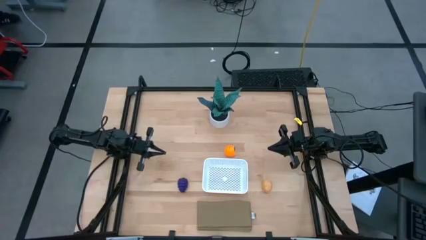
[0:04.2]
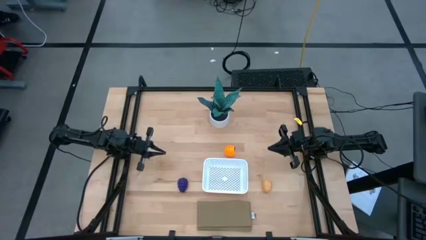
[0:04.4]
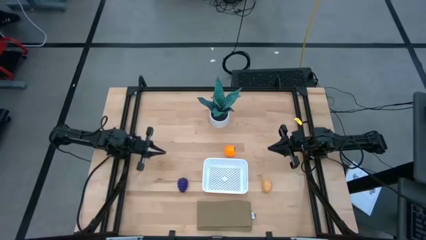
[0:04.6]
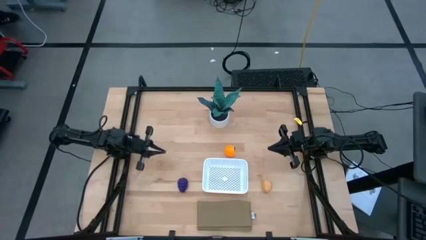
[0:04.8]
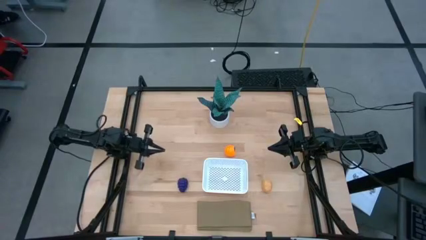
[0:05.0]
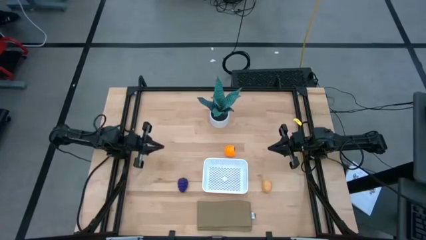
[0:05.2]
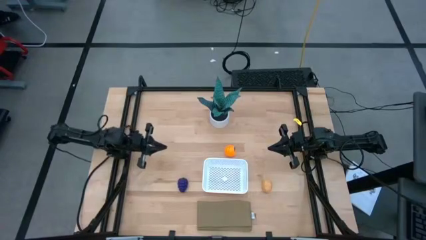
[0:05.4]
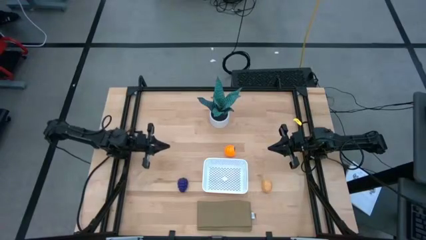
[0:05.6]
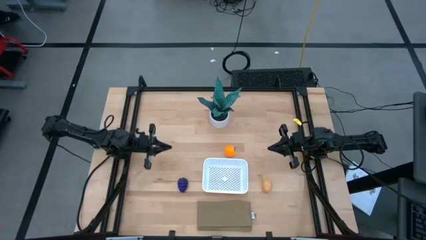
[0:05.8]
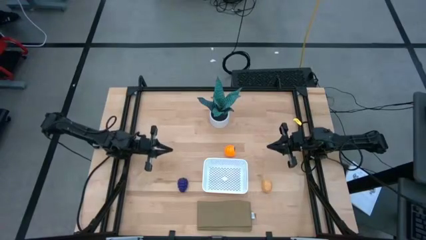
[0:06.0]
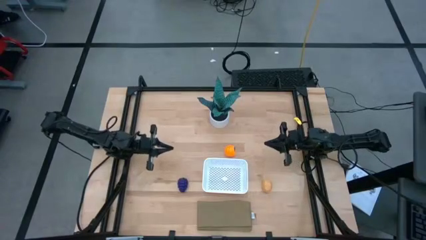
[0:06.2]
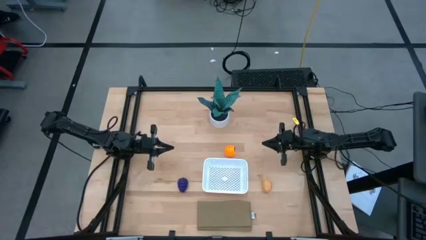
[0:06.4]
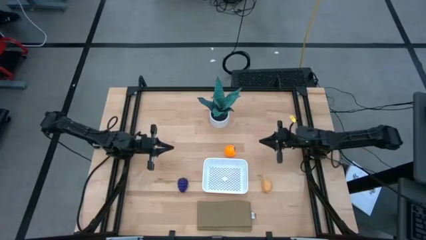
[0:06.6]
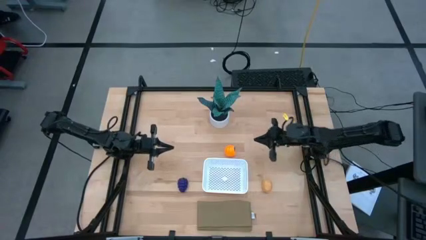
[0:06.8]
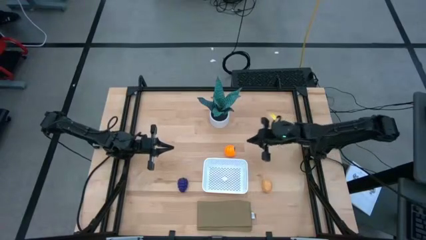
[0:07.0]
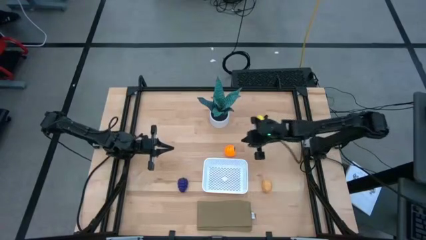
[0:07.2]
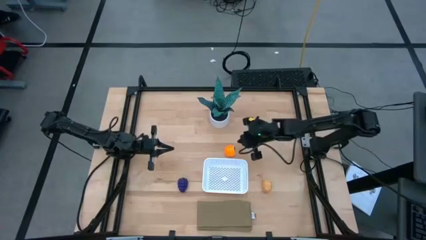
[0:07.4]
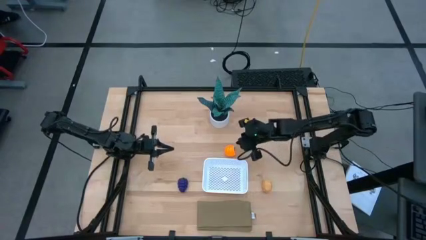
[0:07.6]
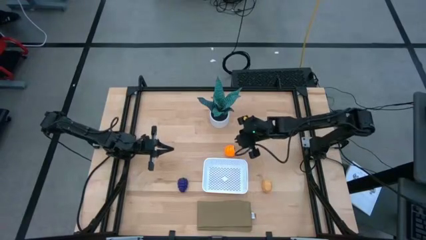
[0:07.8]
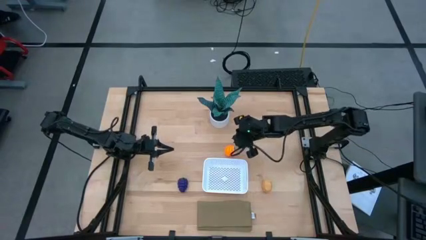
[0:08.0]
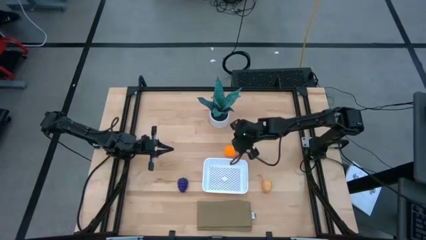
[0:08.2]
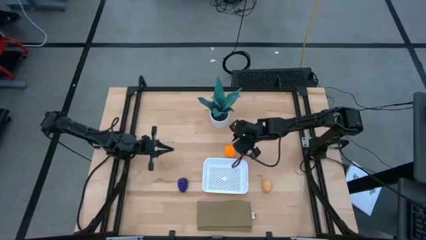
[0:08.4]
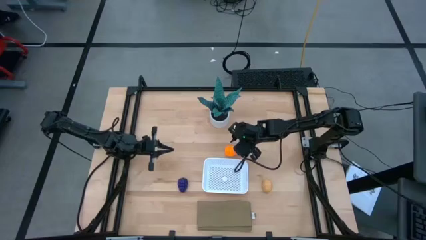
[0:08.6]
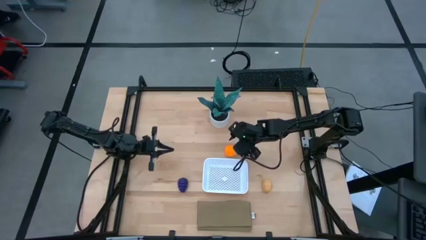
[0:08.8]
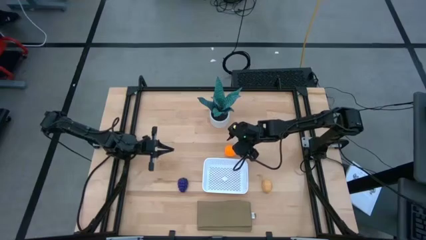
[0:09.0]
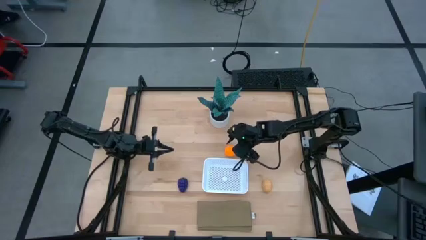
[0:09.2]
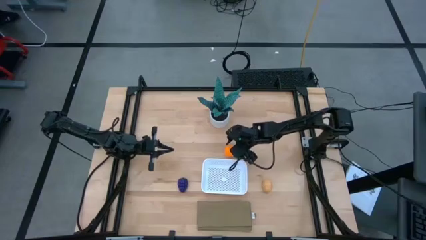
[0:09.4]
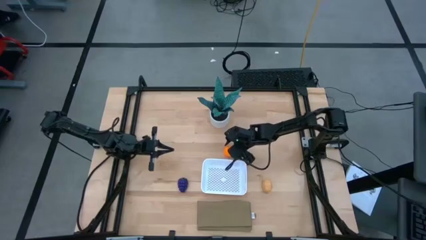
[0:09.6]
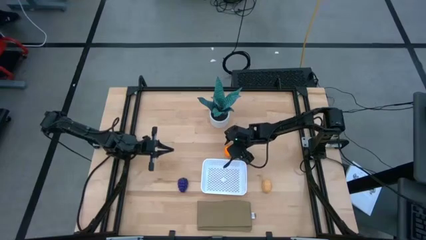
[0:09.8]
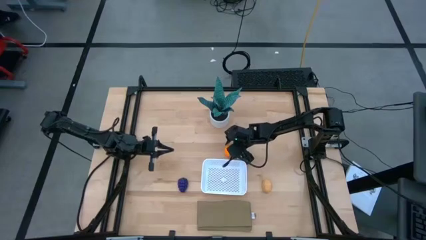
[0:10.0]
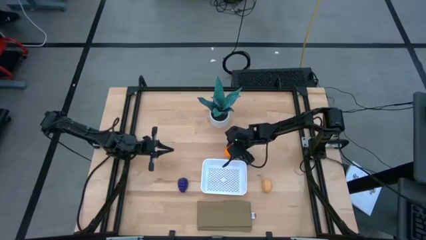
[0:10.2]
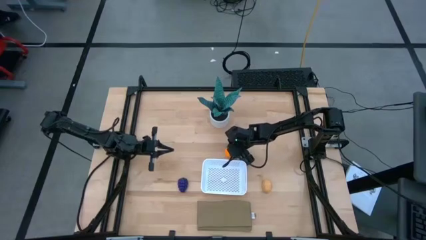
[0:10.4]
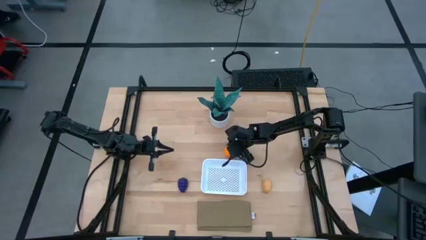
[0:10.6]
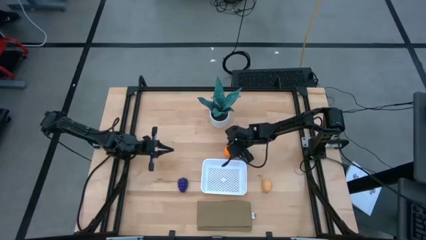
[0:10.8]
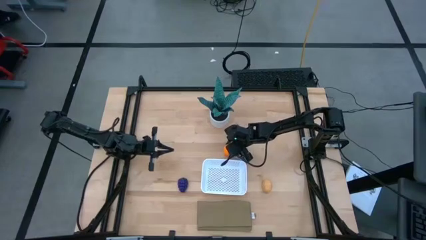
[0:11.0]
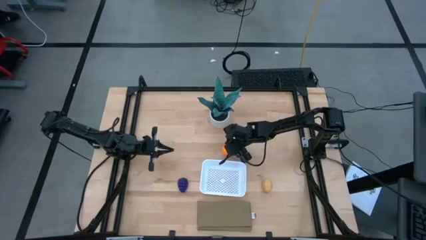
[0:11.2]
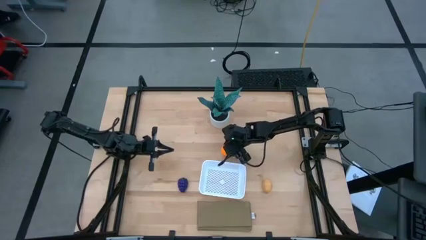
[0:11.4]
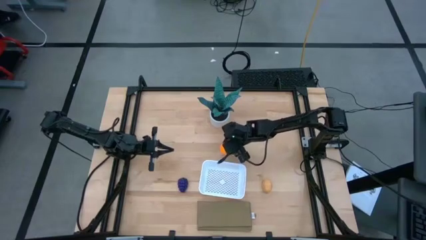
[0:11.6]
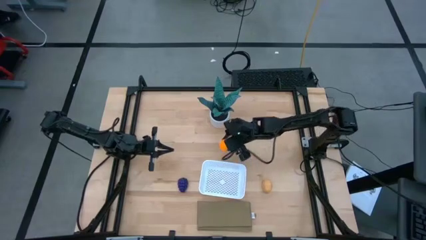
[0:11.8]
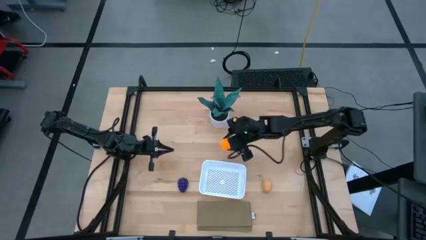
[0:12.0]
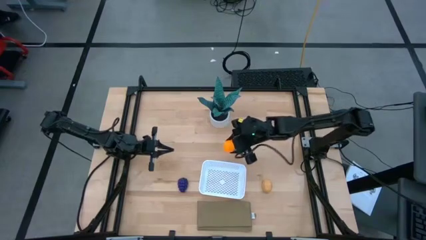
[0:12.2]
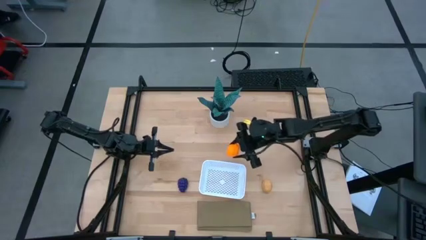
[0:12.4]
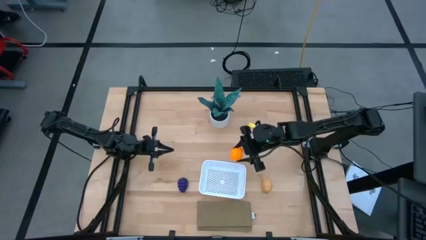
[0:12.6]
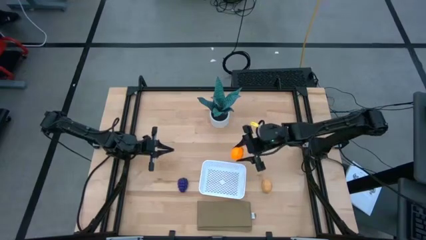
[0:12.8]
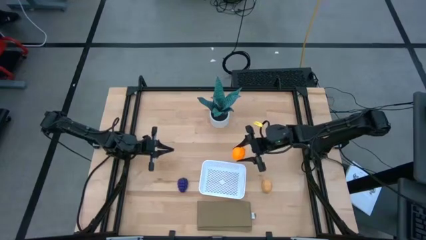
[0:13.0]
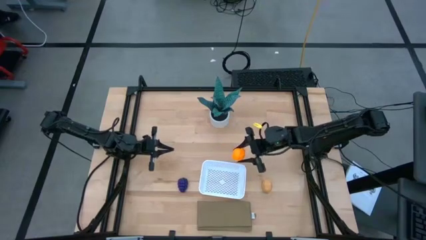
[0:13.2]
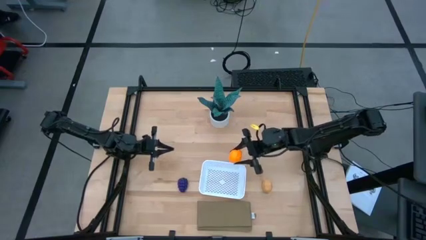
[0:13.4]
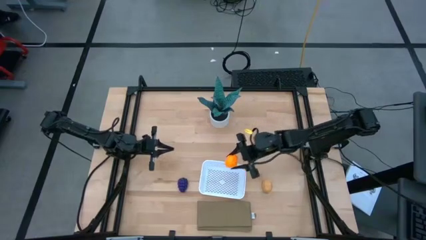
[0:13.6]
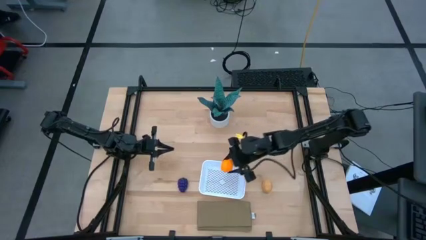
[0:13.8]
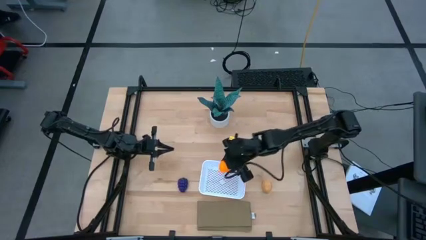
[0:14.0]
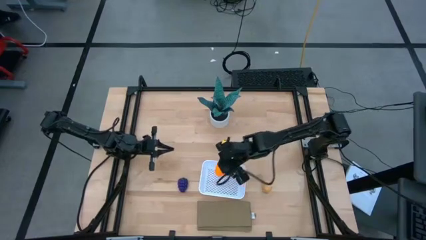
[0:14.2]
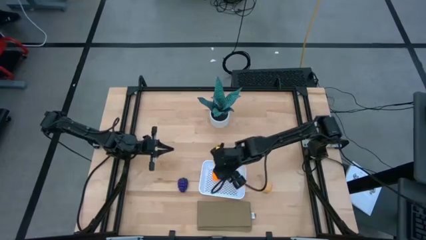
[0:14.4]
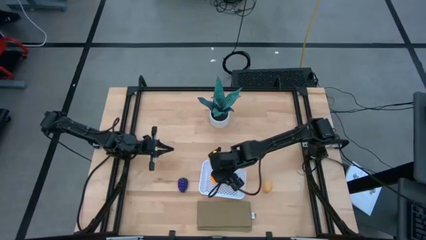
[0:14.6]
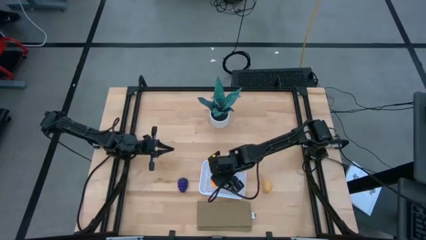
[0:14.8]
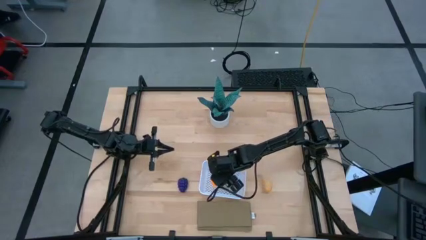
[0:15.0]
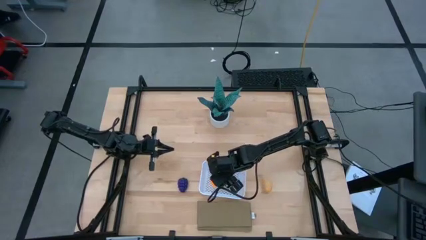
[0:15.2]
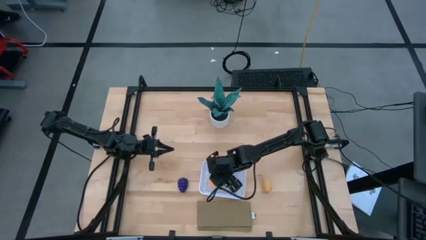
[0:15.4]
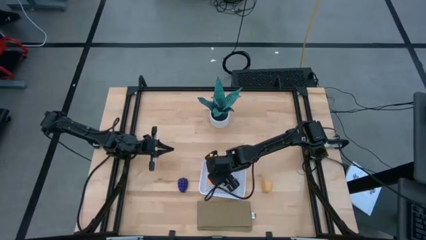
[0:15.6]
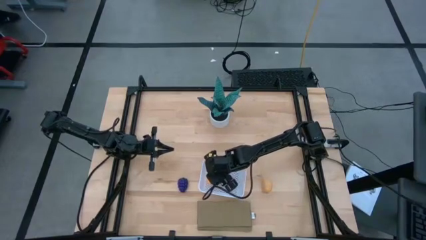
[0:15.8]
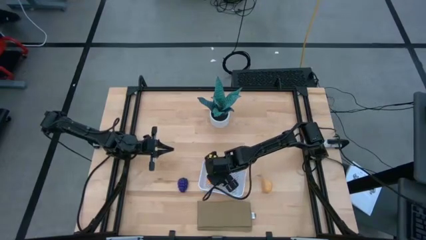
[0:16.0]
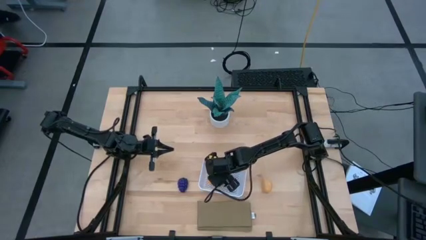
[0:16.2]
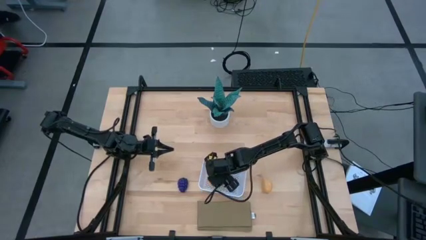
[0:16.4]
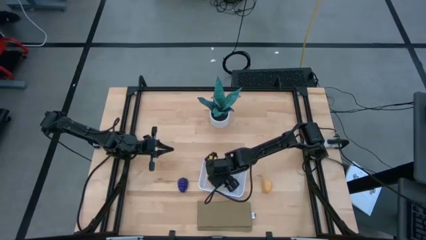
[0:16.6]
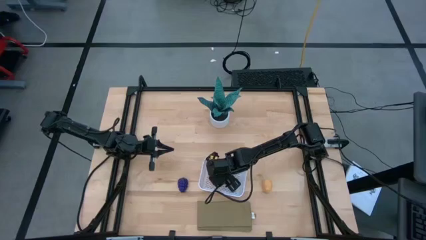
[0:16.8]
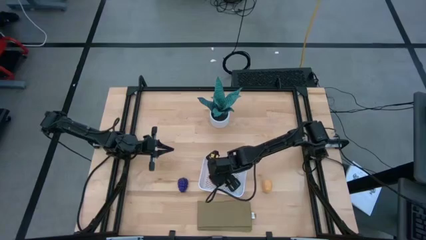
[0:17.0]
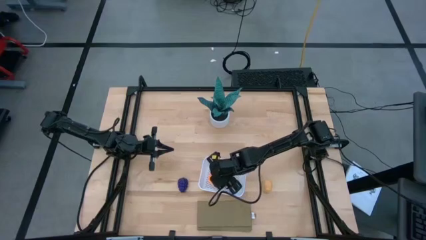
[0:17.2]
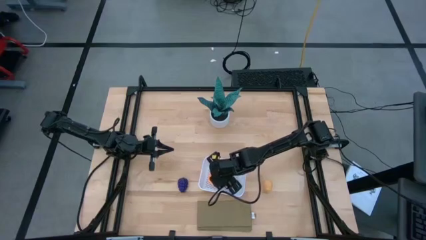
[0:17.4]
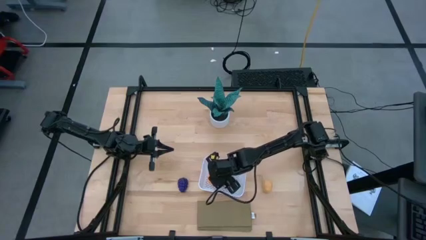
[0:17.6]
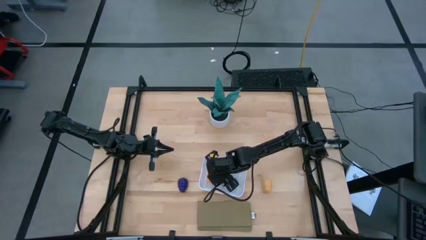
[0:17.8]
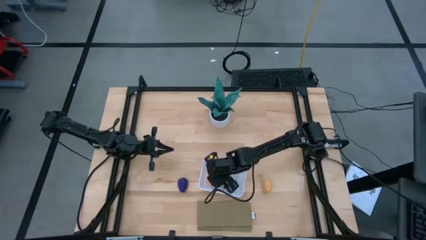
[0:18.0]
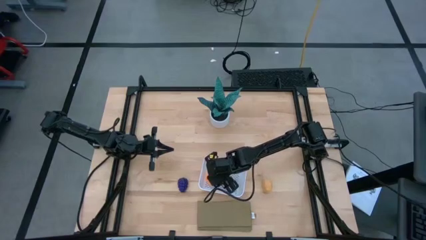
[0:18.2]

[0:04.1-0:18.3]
Task: Pick and placing Produce into tupperware
Put the orange into the white basket

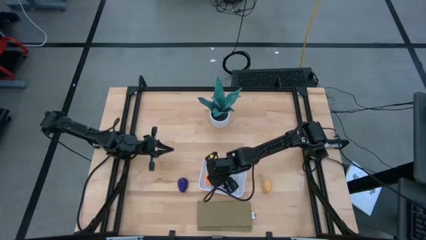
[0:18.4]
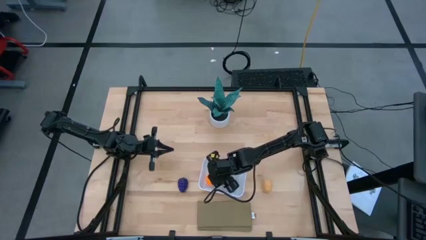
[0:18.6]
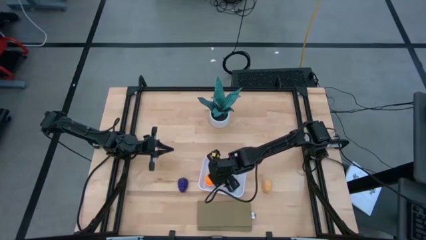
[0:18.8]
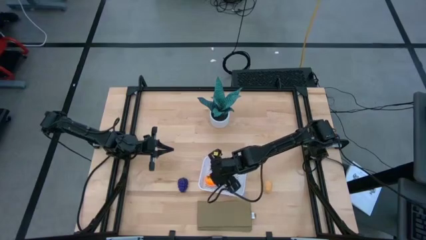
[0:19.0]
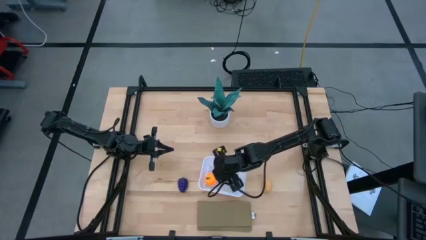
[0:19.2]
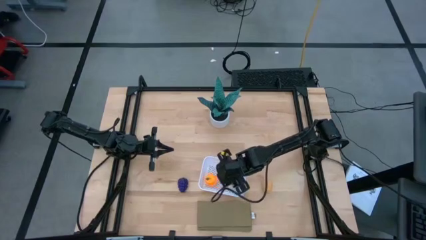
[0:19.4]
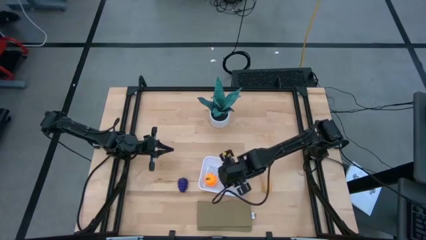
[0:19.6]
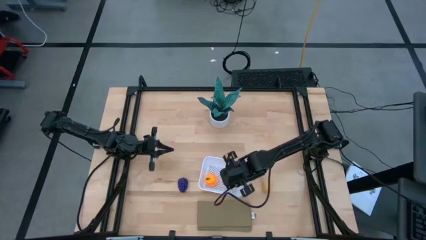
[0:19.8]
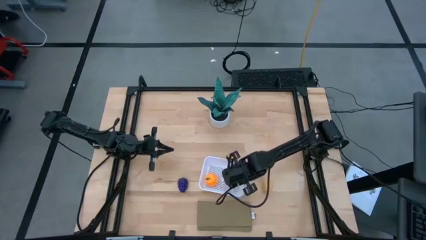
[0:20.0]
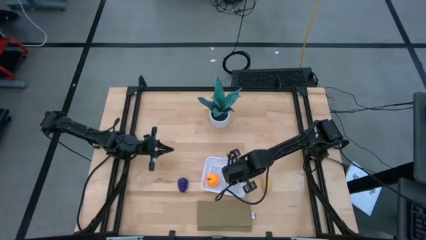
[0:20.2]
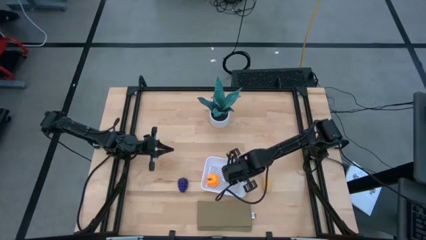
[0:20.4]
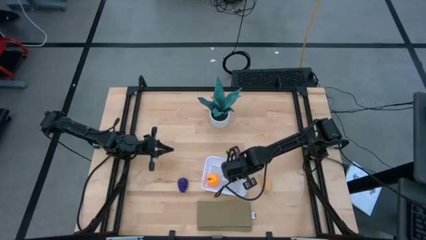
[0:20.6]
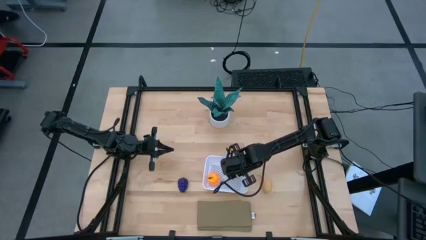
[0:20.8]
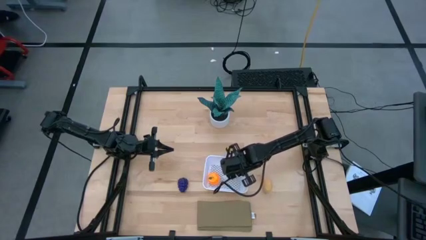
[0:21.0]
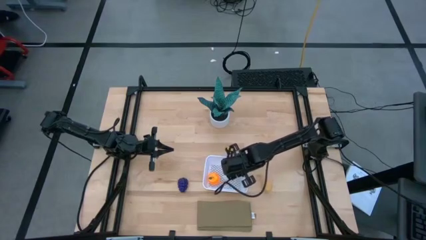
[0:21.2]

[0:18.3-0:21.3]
Adjust the white basket
